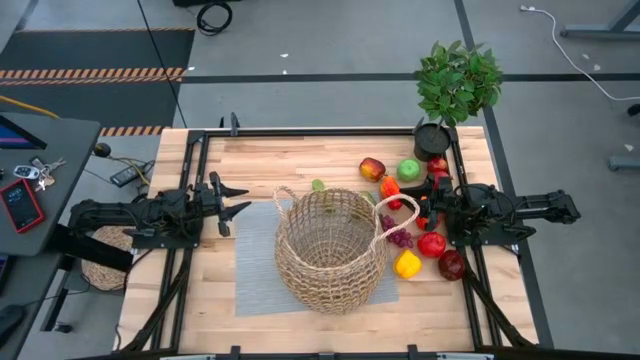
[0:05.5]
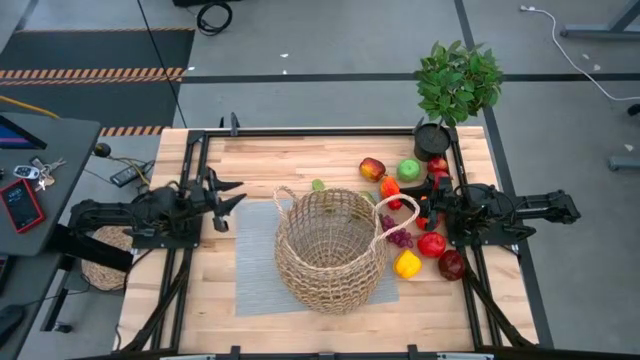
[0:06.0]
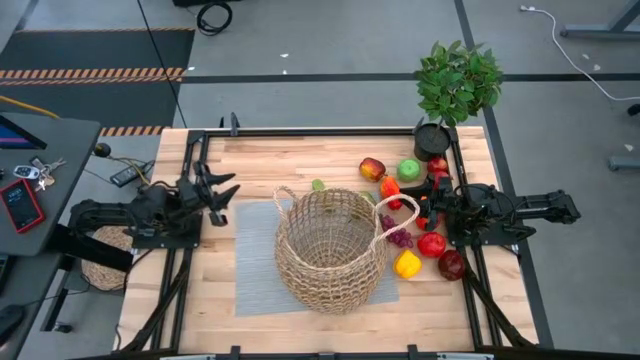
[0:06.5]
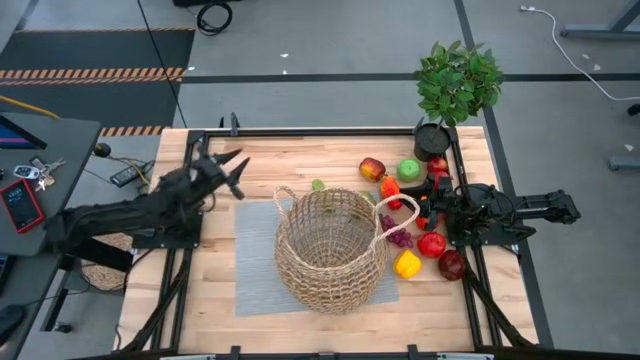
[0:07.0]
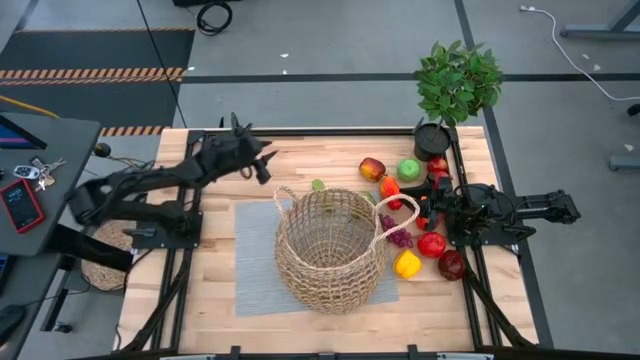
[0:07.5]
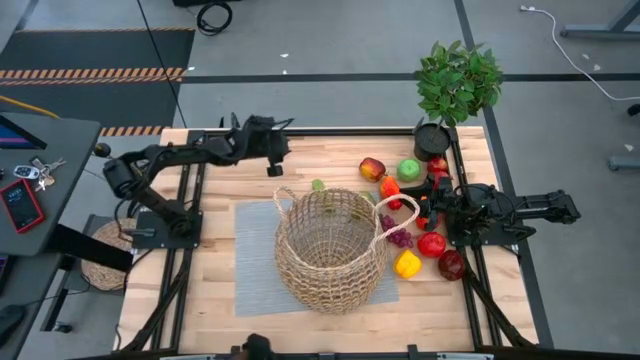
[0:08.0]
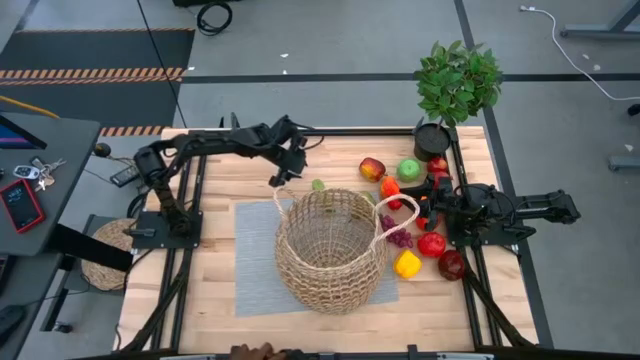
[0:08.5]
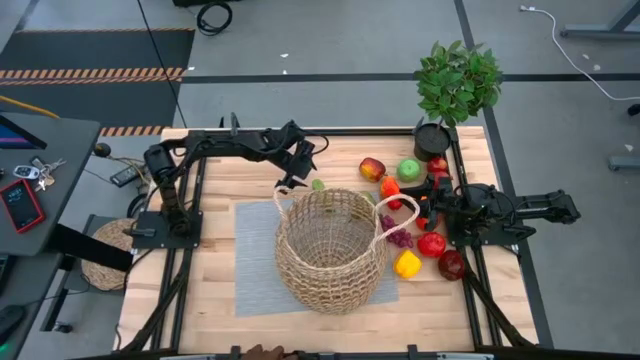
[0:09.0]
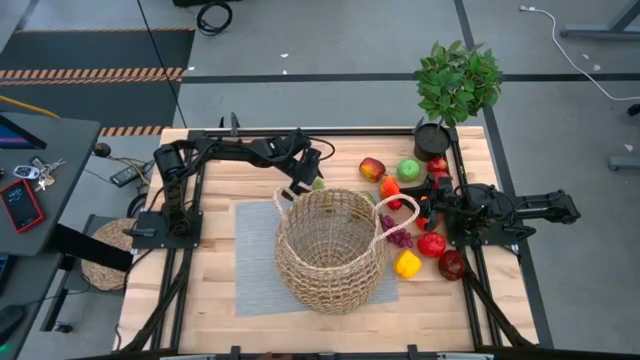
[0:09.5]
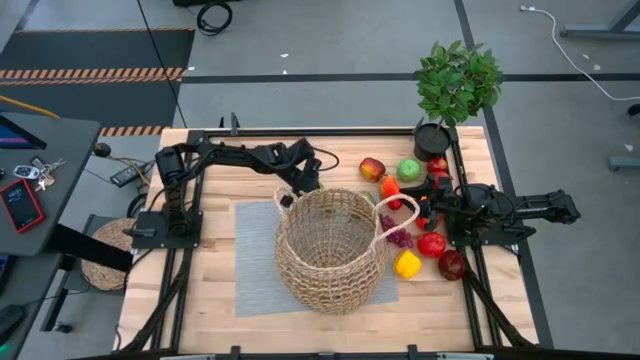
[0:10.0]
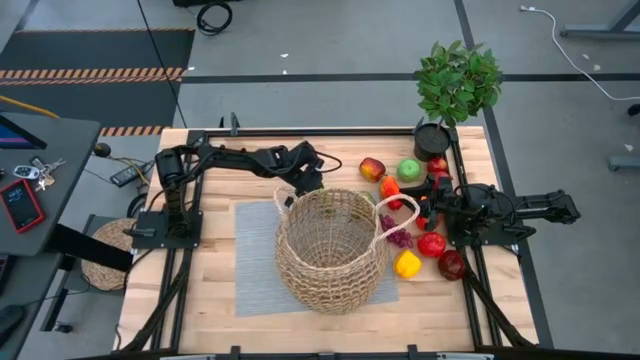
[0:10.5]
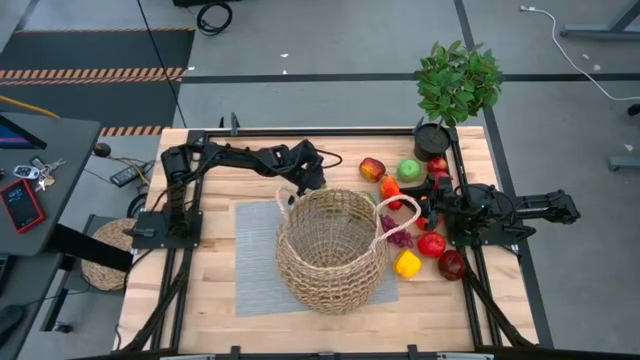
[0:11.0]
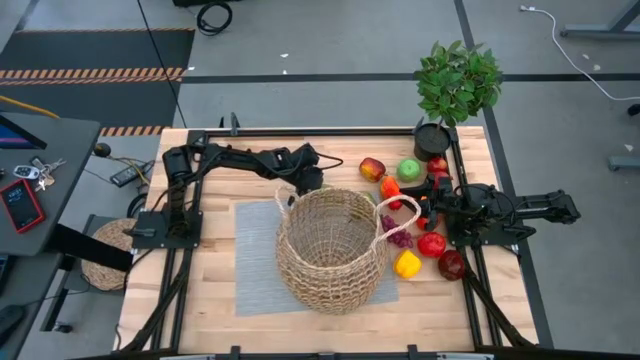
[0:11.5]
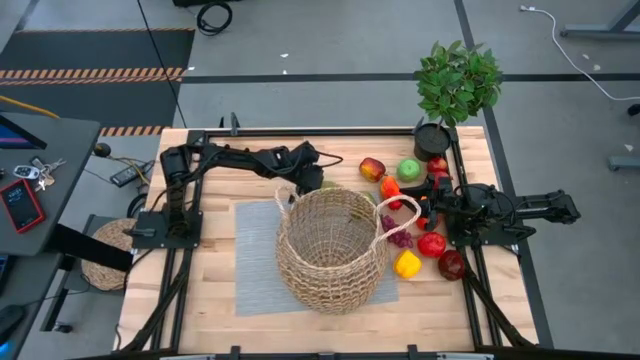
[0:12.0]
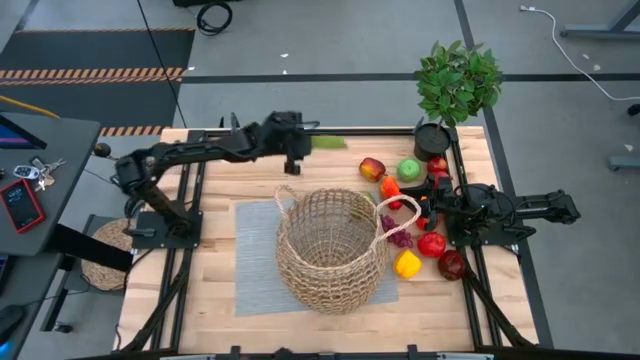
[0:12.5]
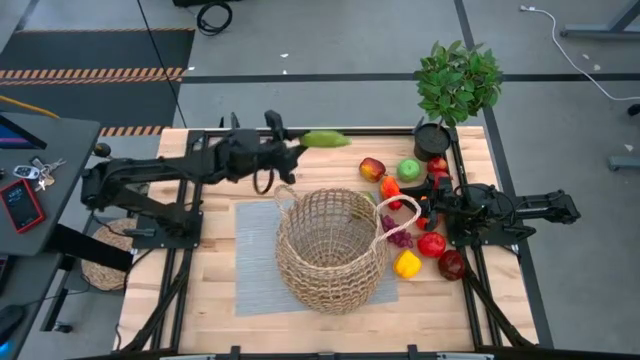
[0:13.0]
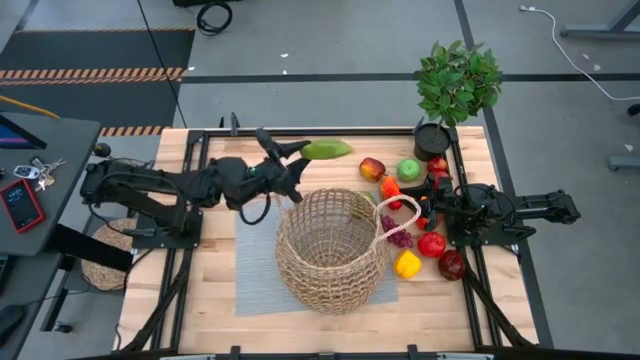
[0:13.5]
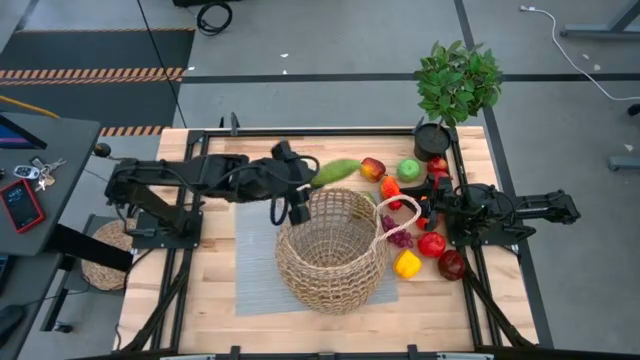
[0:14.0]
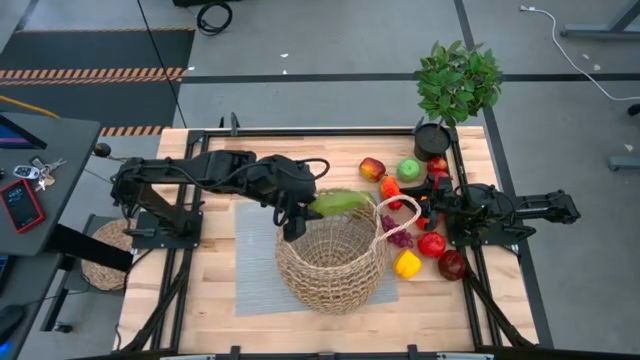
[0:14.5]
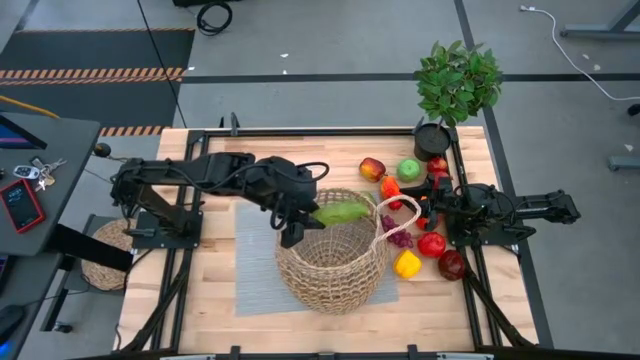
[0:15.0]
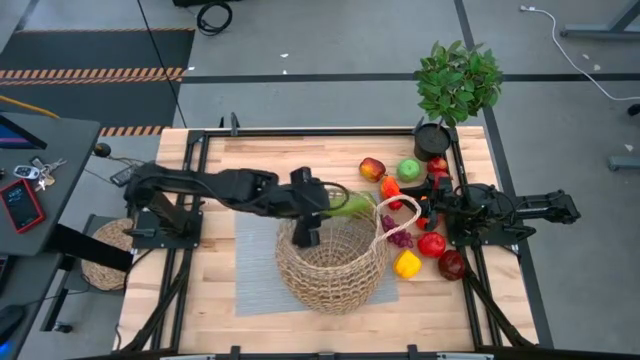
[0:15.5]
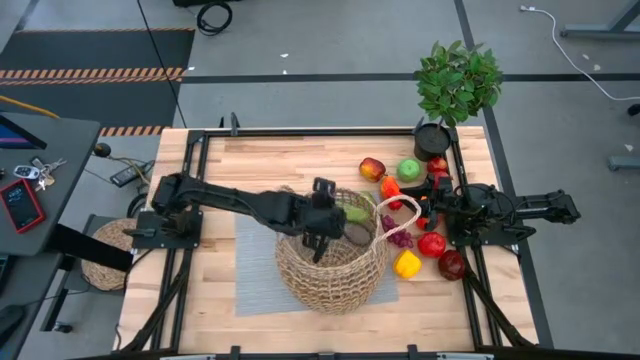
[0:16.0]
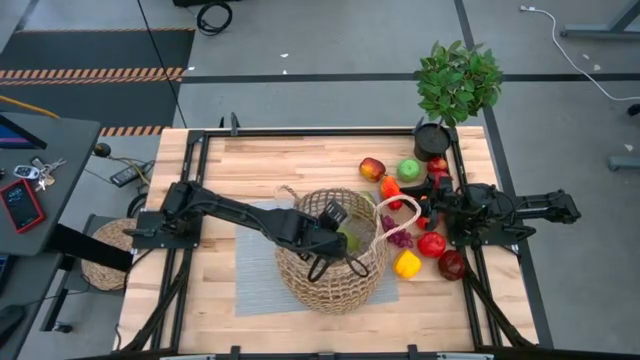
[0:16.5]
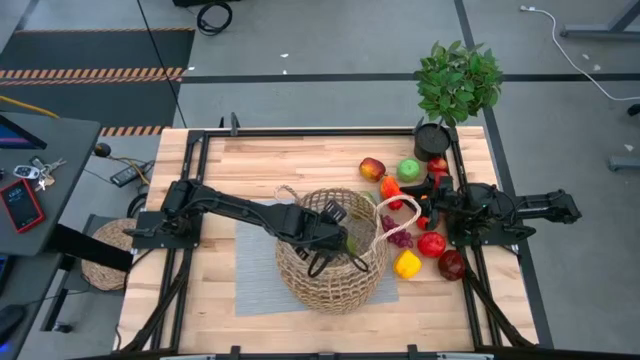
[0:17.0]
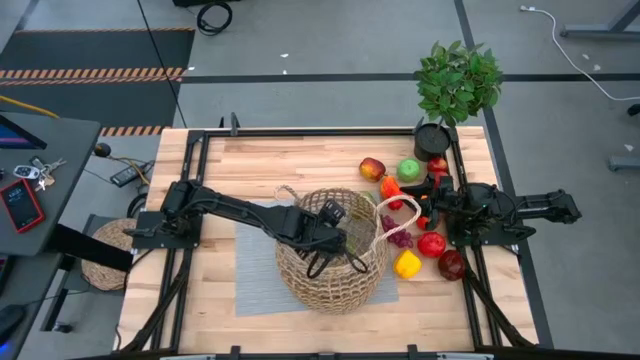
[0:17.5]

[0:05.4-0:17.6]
Task: Build produce basket
Put the cucumber into the basket

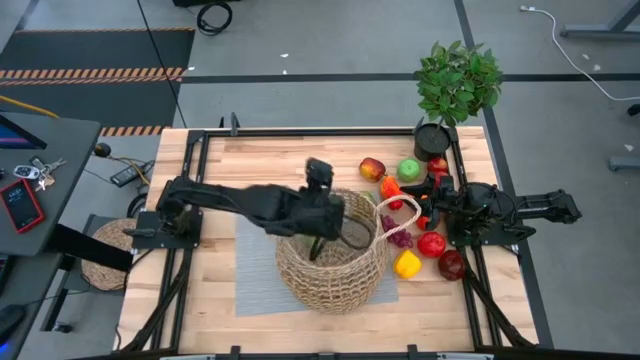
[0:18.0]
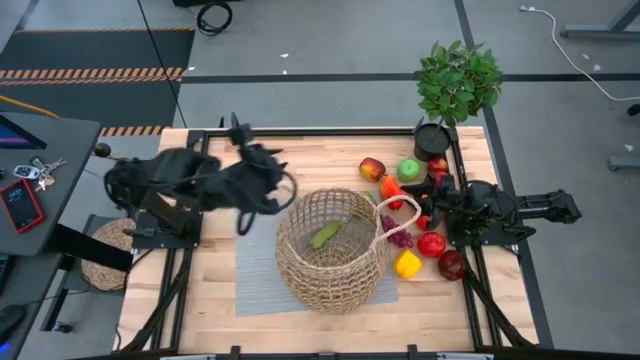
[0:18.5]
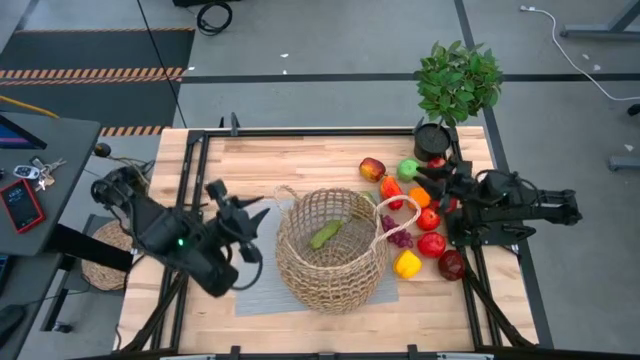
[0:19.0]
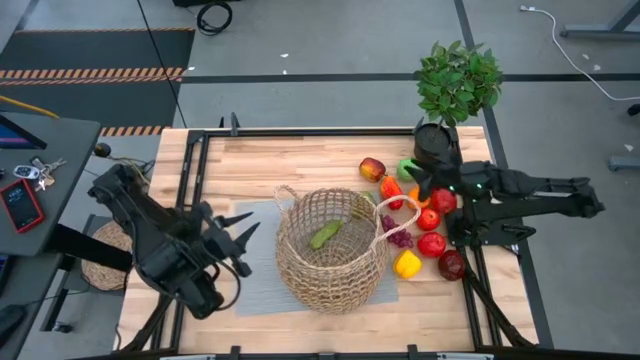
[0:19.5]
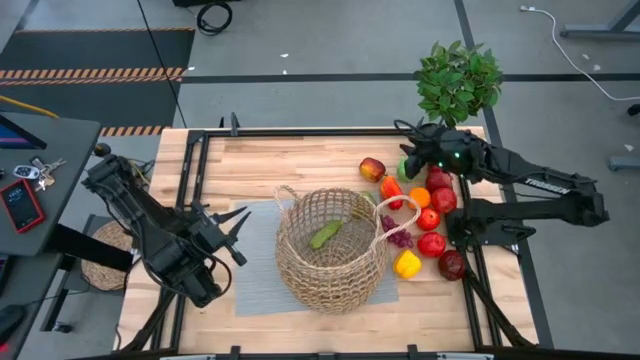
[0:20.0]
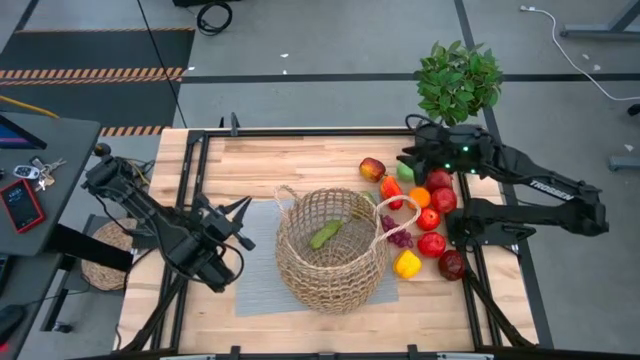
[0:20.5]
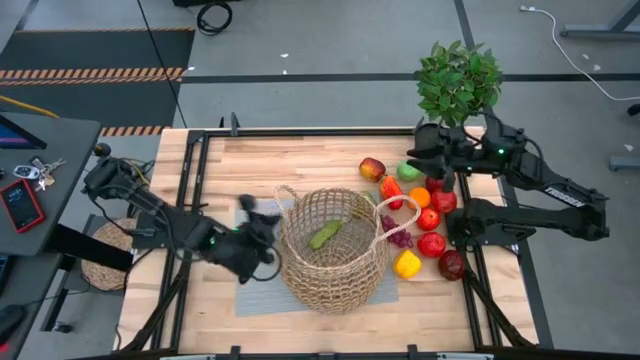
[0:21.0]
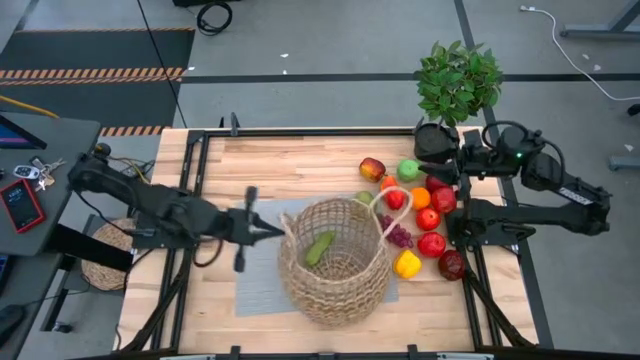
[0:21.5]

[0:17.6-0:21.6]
Adjust the basket
